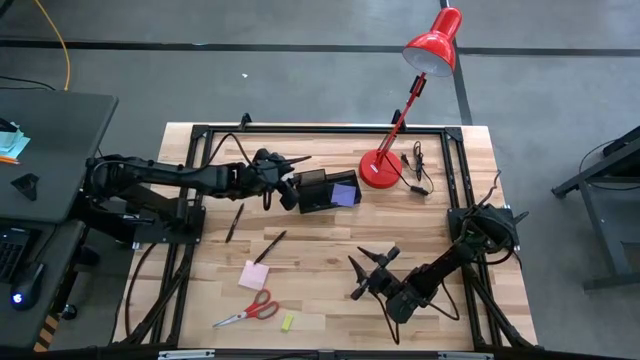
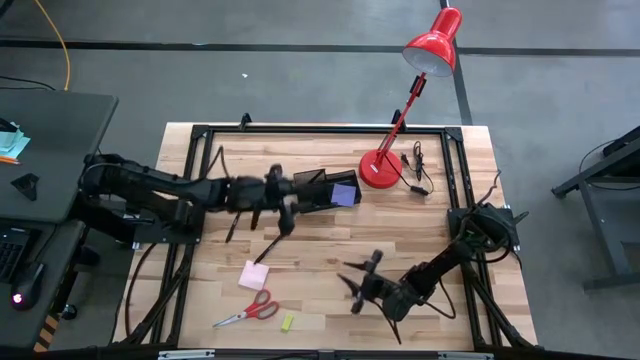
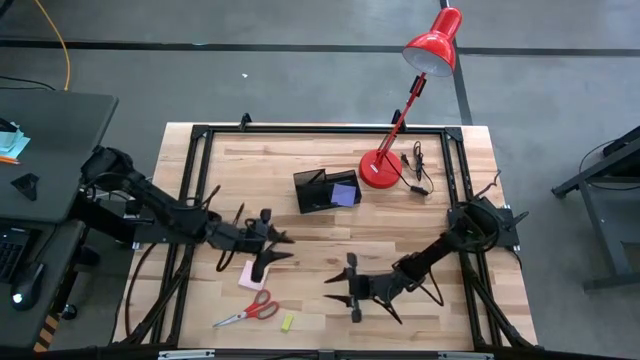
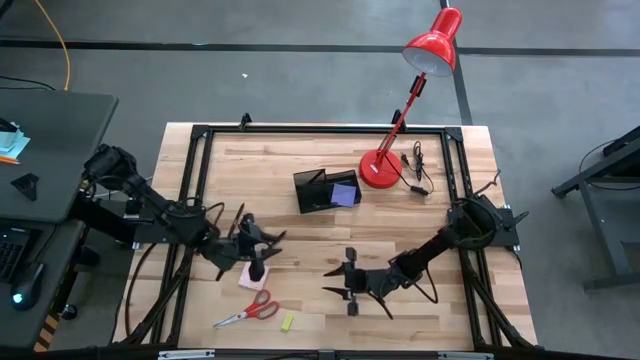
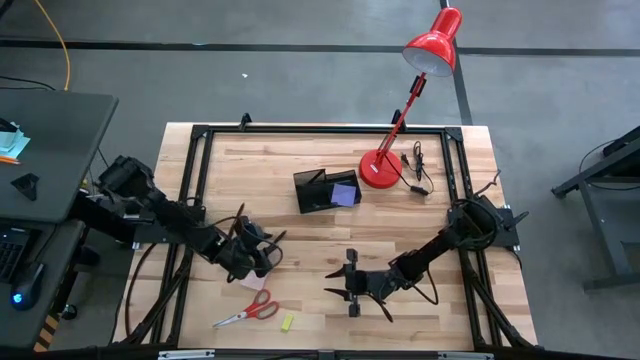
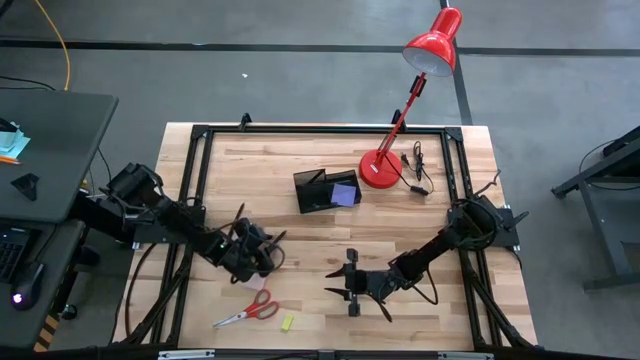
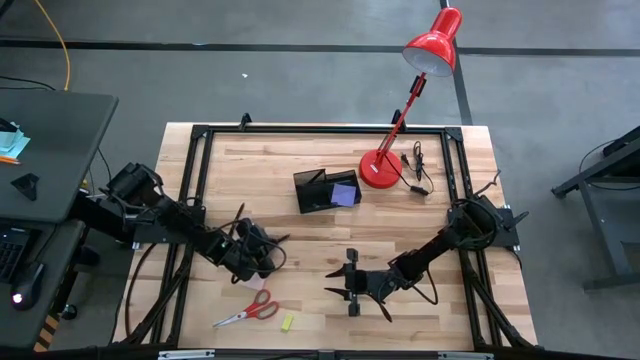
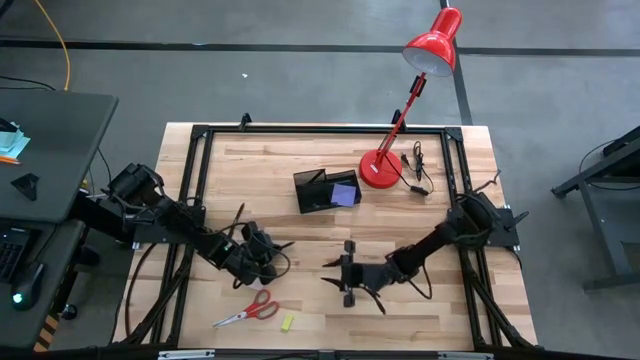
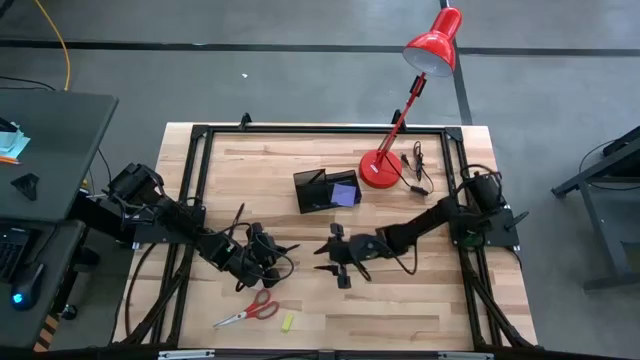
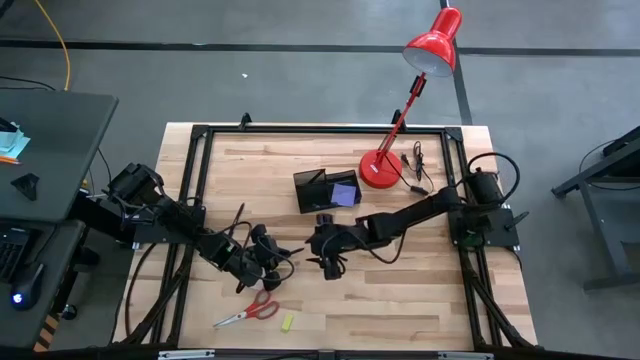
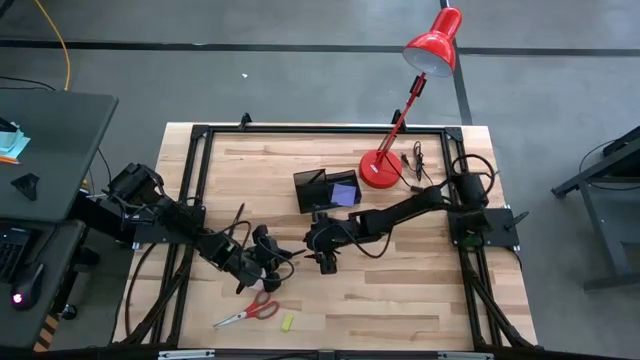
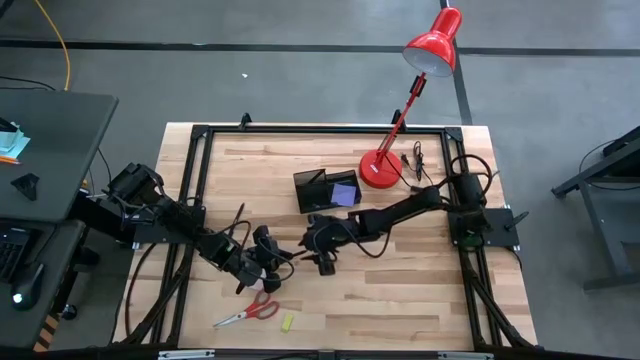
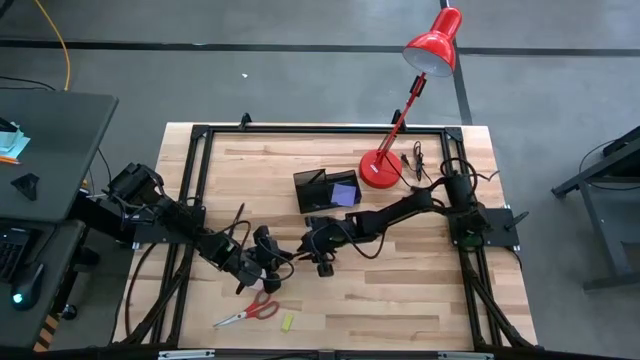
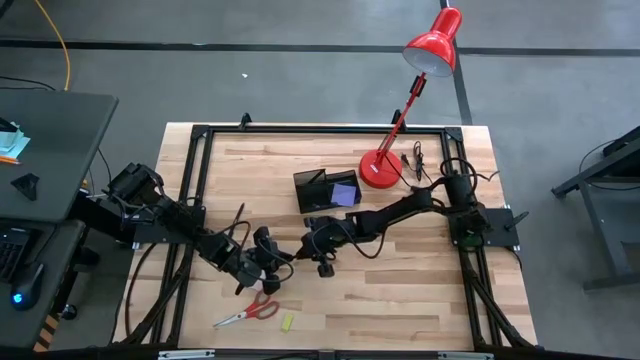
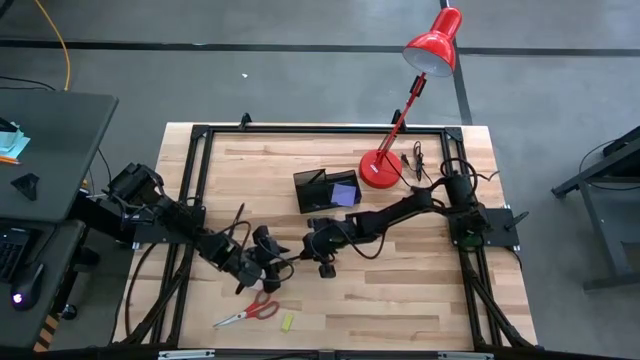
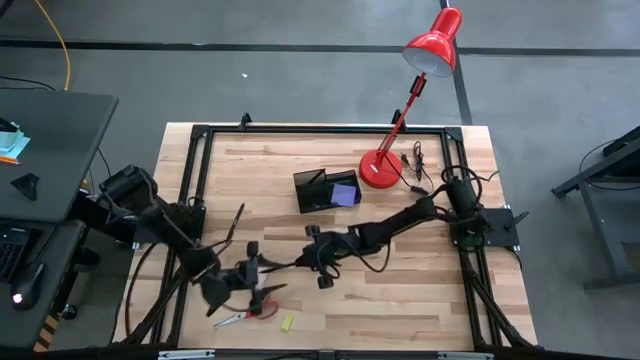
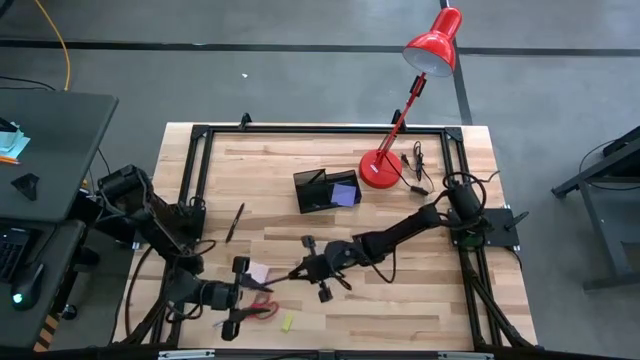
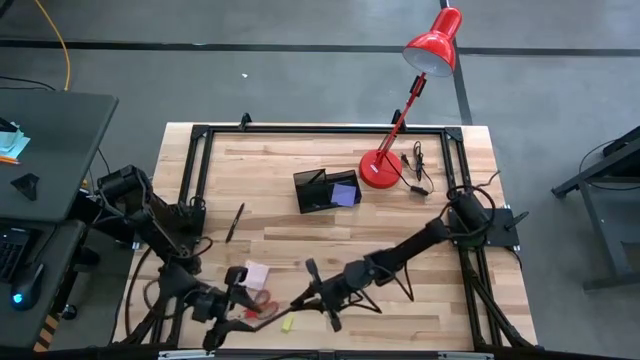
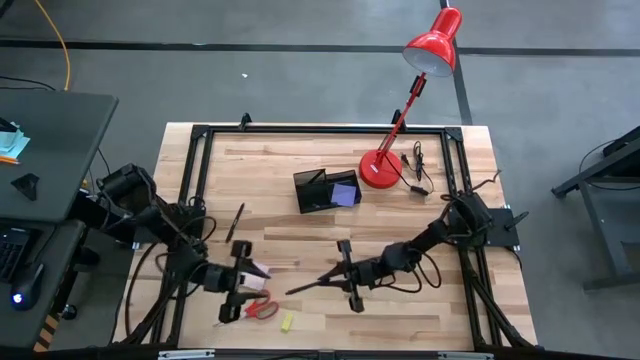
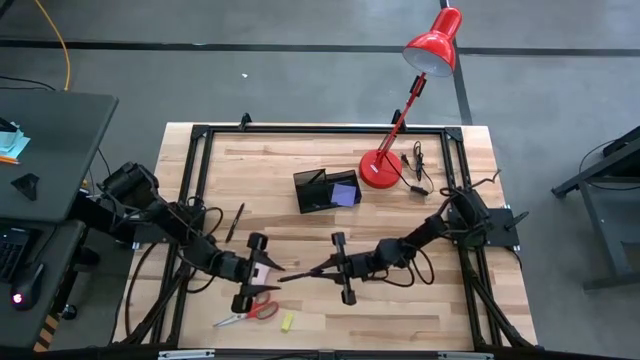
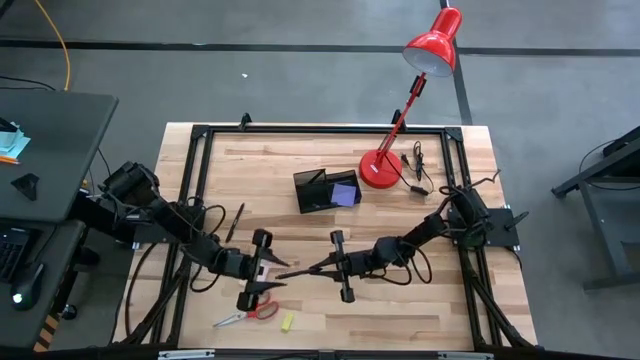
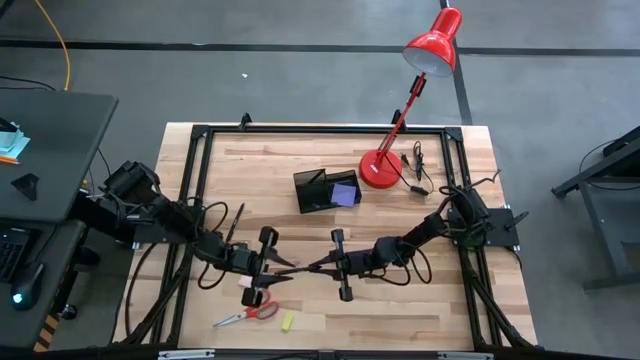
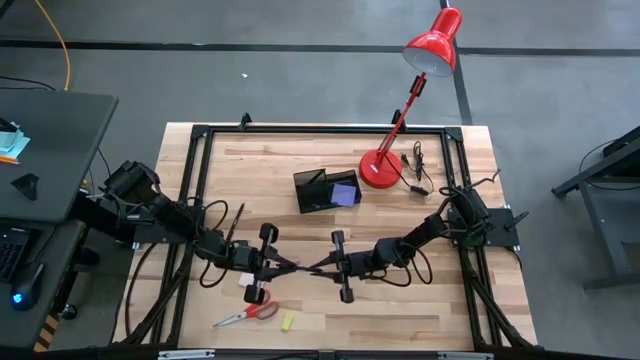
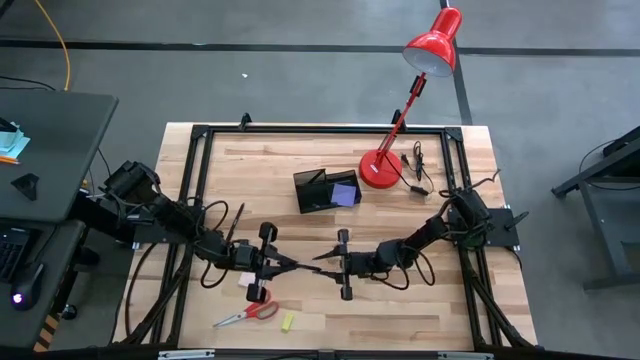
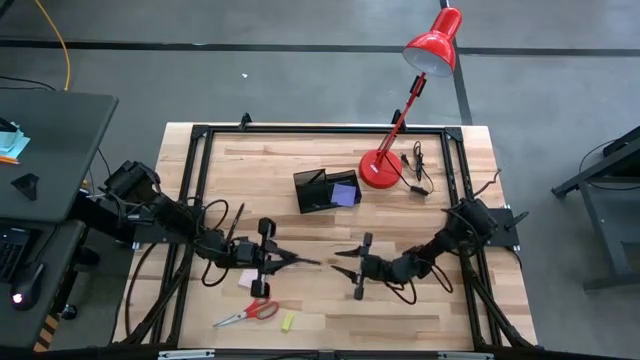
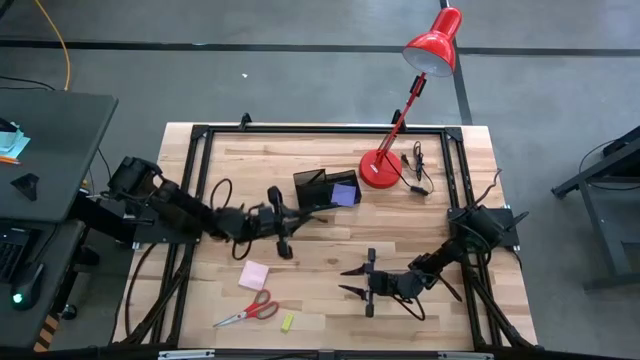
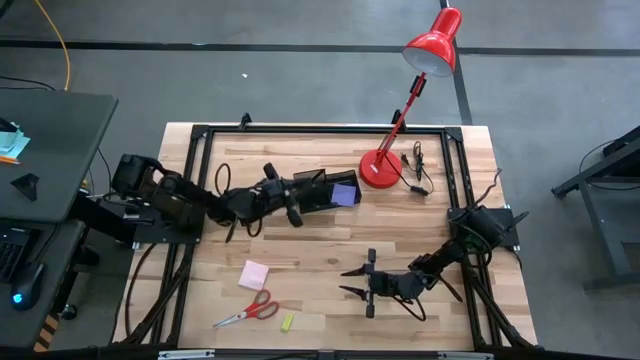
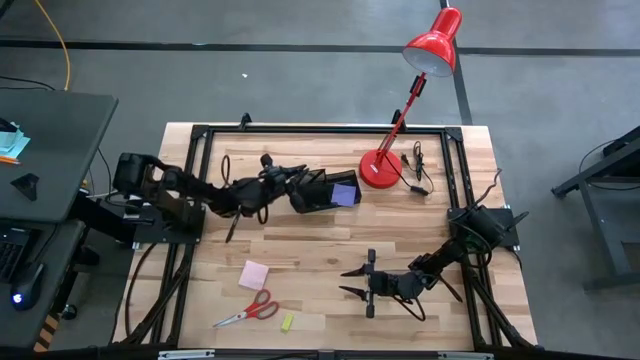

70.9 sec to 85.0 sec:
Task: Pick and place office supplies into organizer
Put the black pen into the black desk organizer

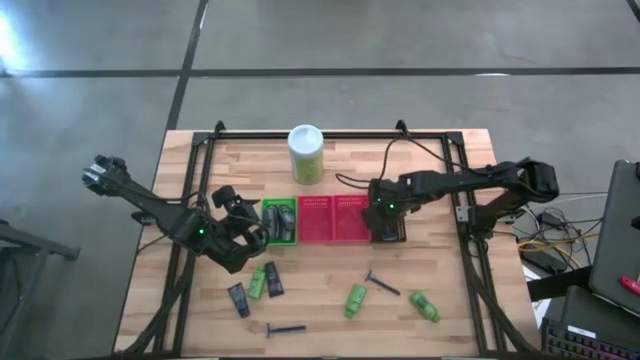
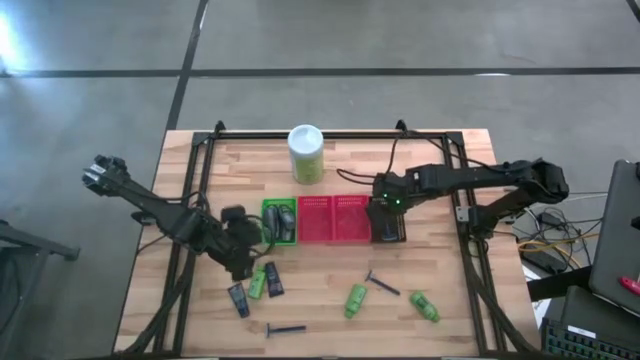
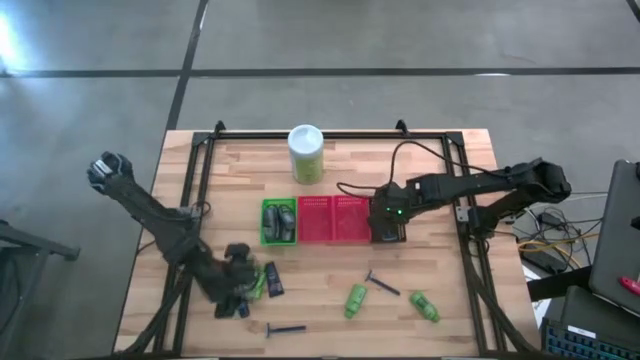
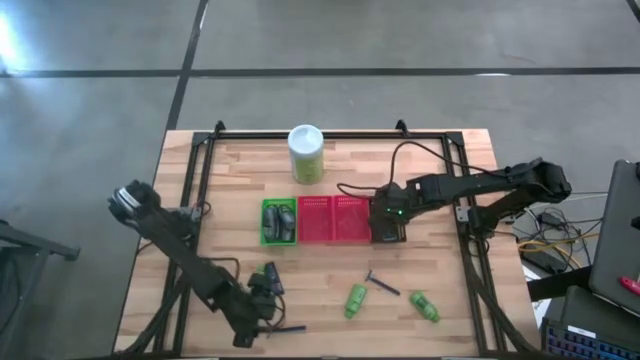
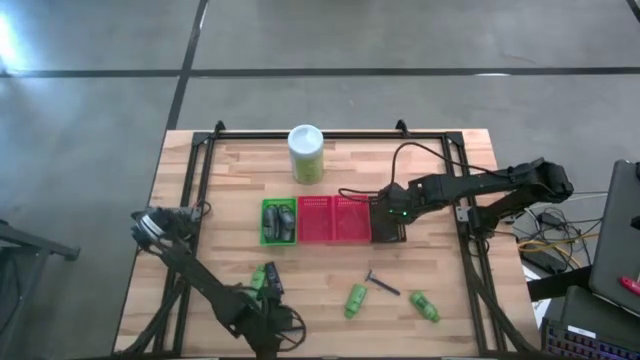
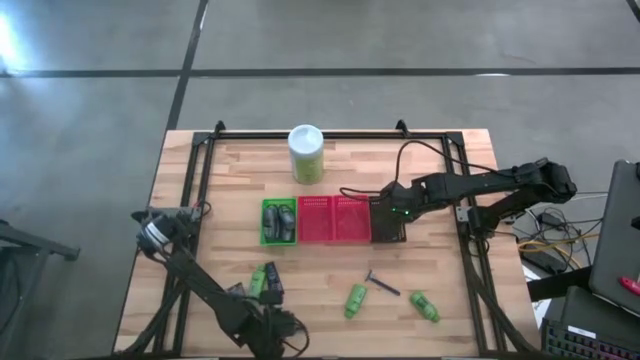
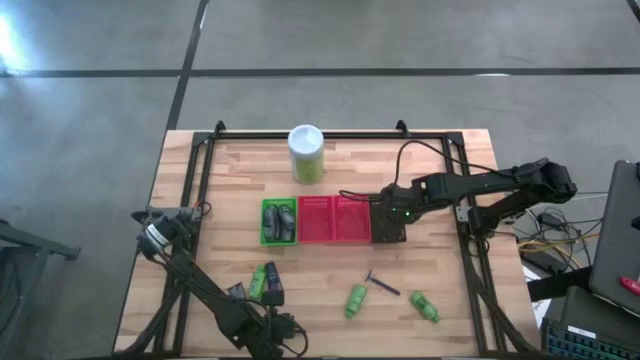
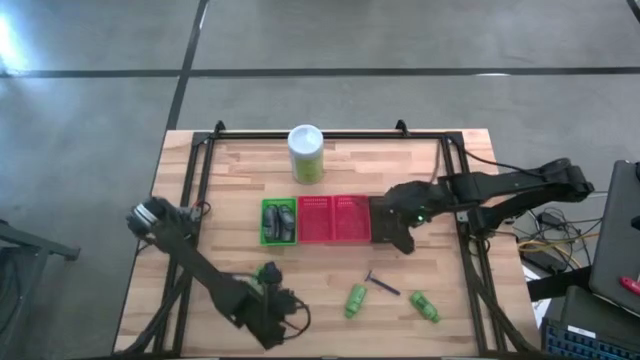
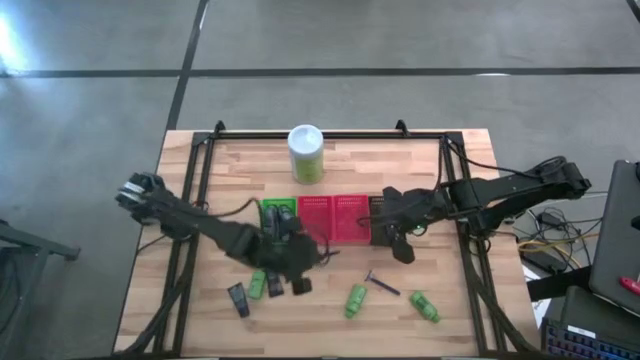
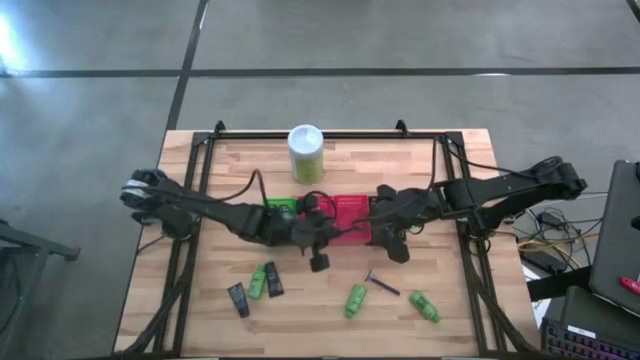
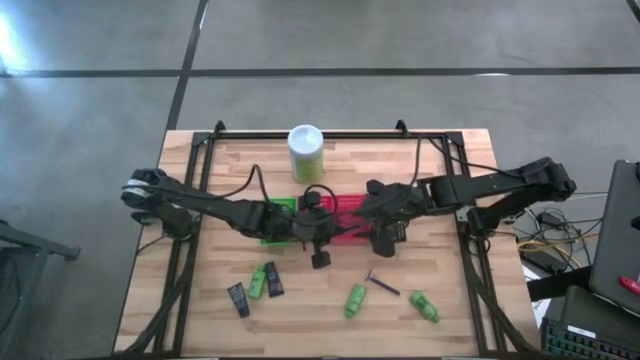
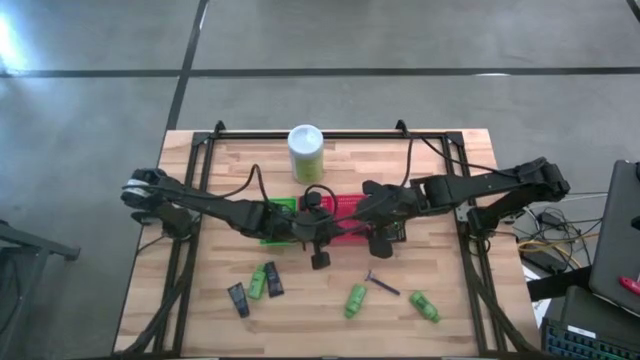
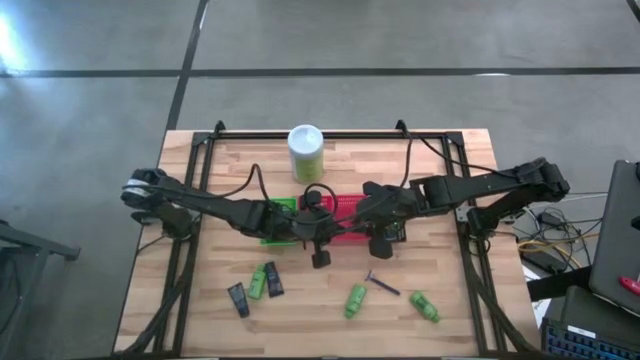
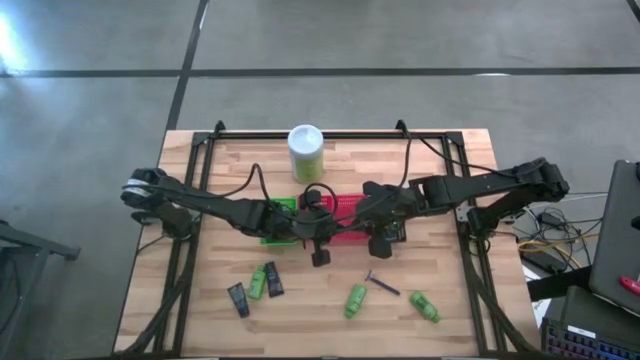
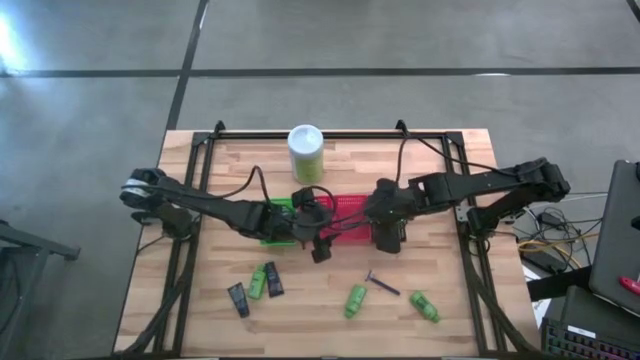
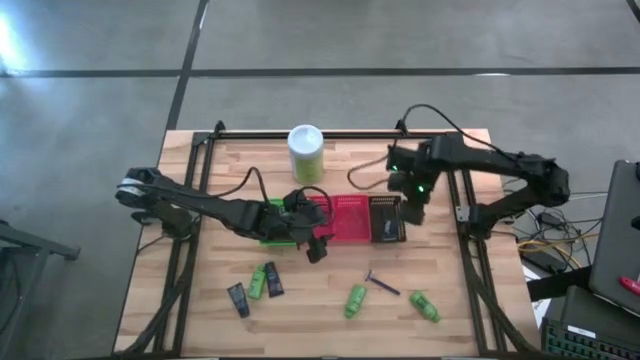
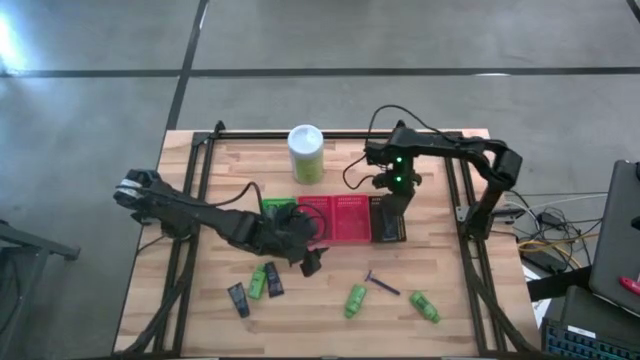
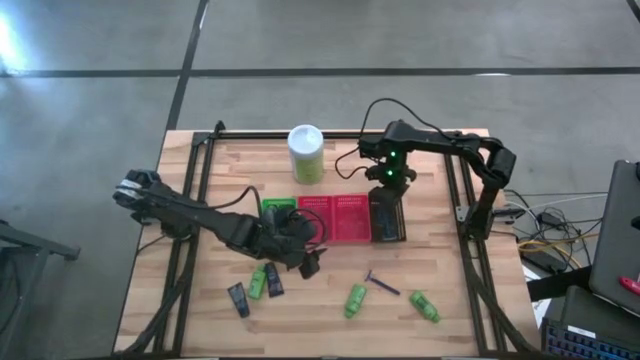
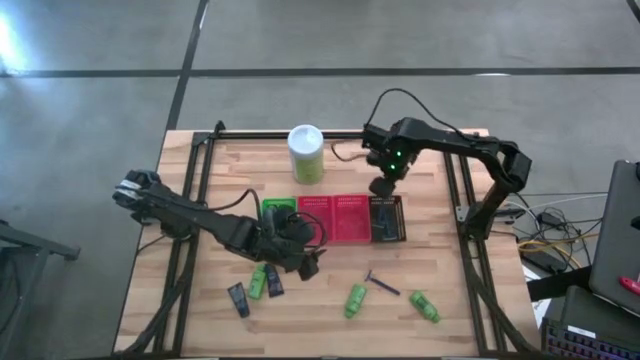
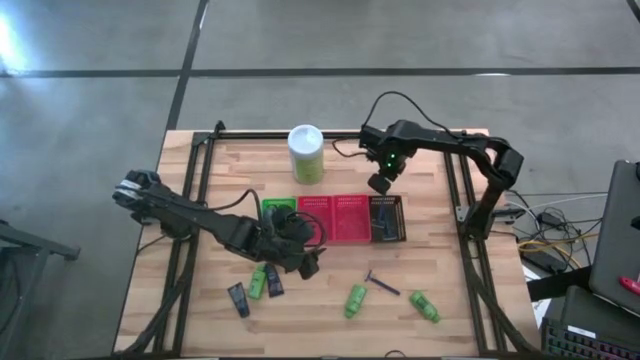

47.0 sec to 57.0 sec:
Task: Pick & Place Travel size toiletries
Put the blue razor into the black bin
